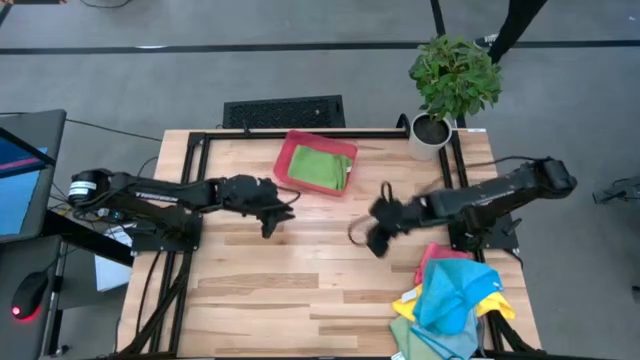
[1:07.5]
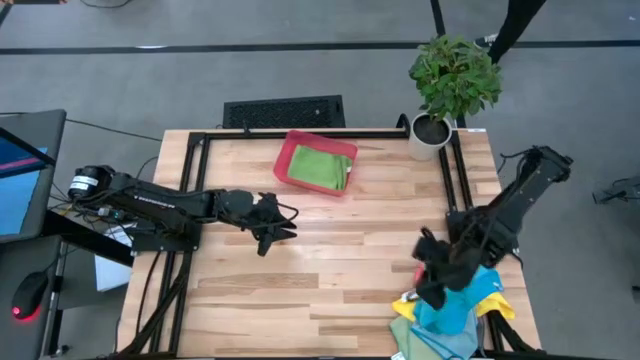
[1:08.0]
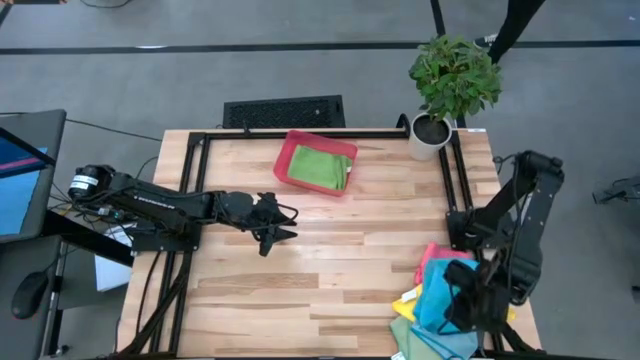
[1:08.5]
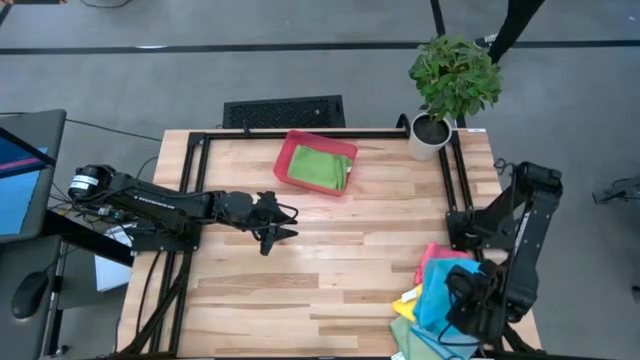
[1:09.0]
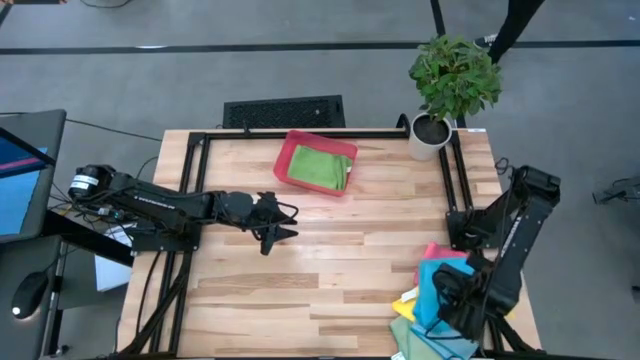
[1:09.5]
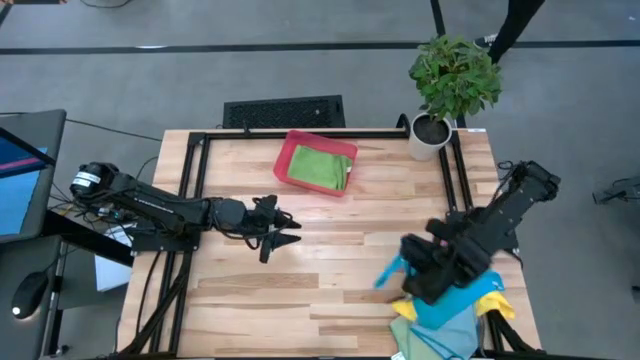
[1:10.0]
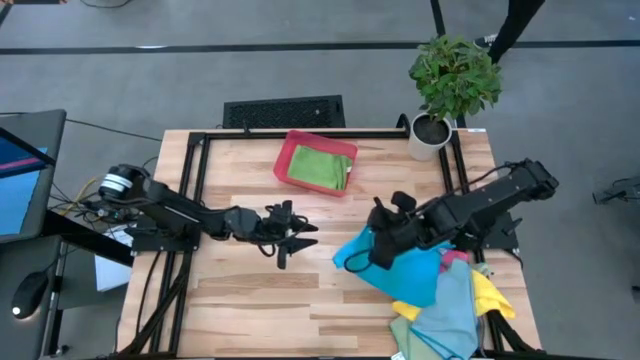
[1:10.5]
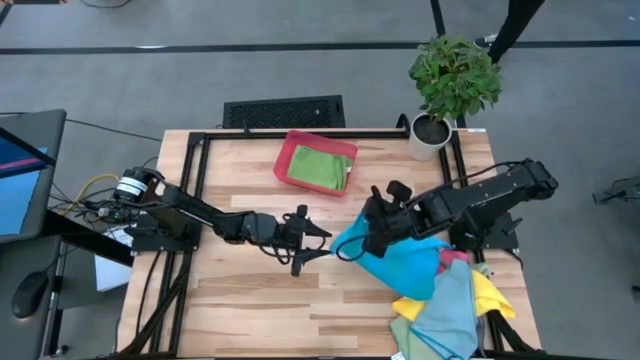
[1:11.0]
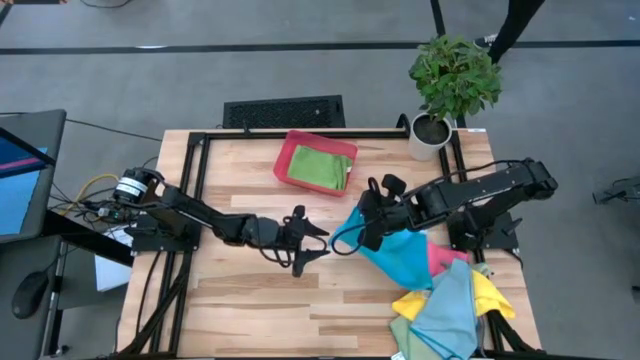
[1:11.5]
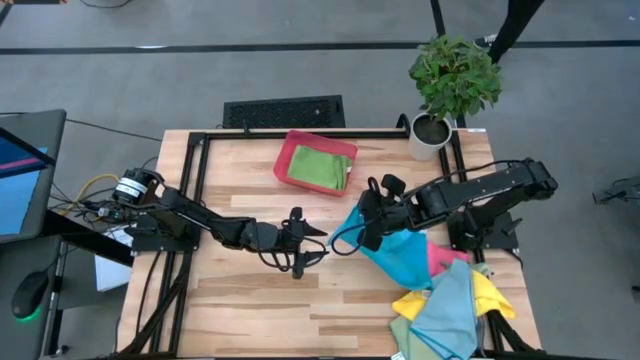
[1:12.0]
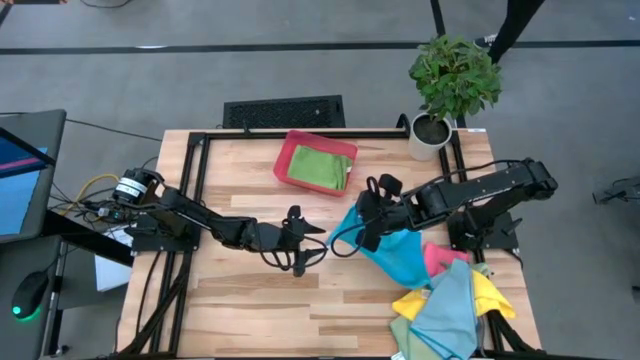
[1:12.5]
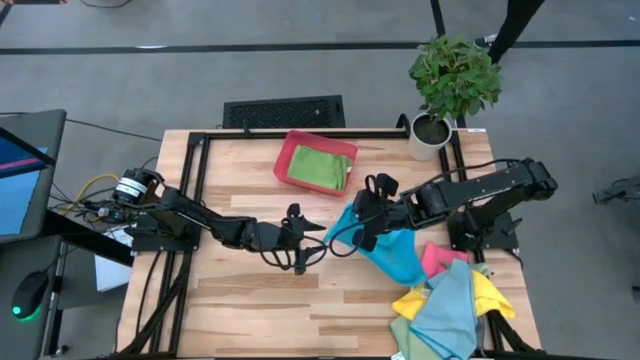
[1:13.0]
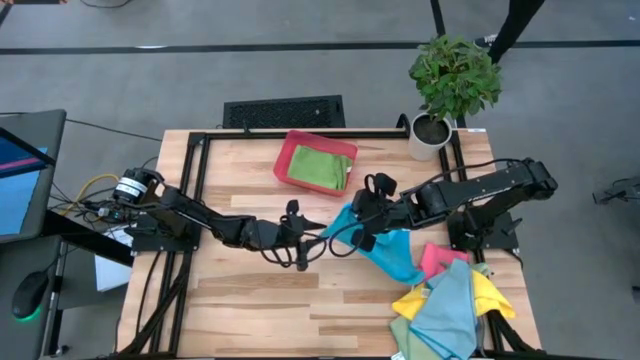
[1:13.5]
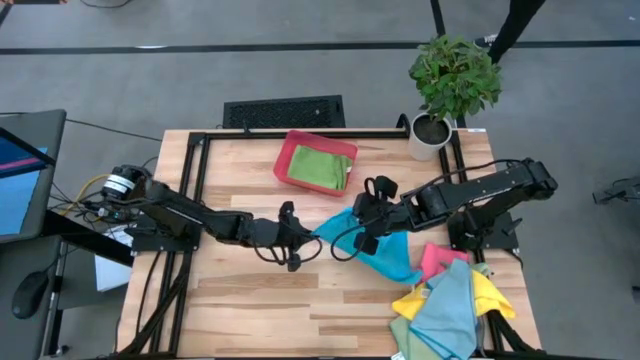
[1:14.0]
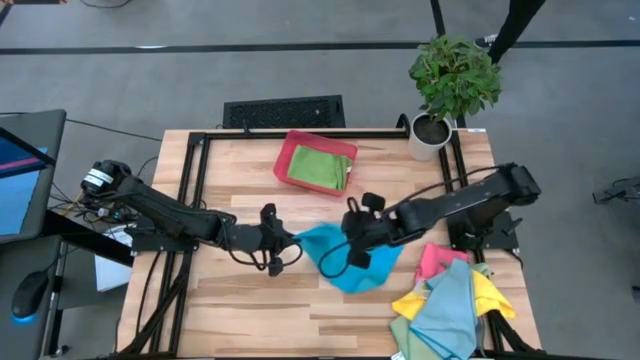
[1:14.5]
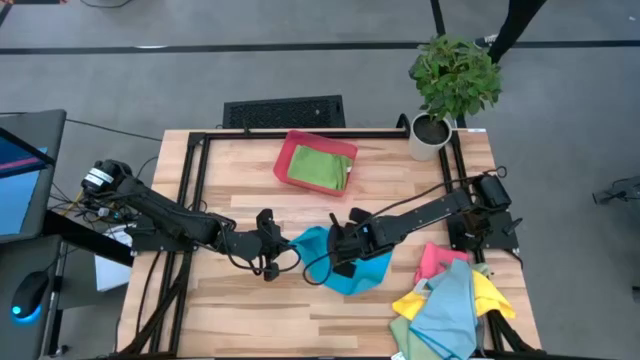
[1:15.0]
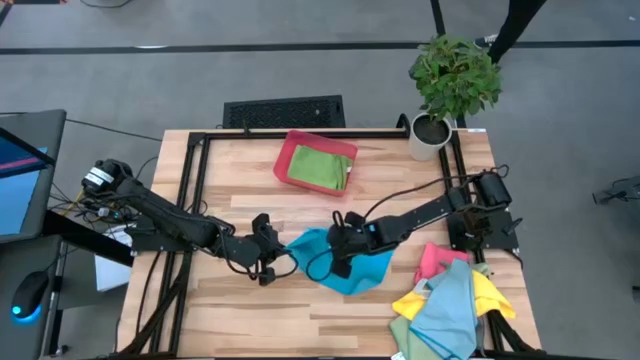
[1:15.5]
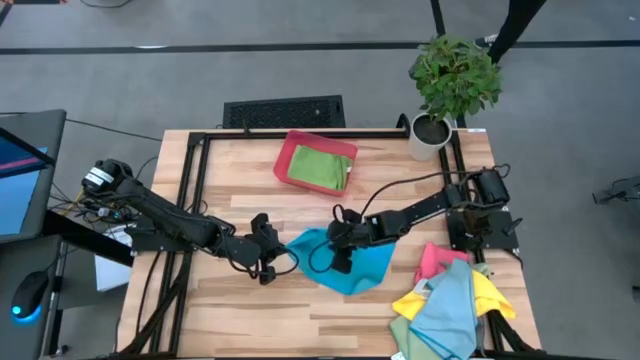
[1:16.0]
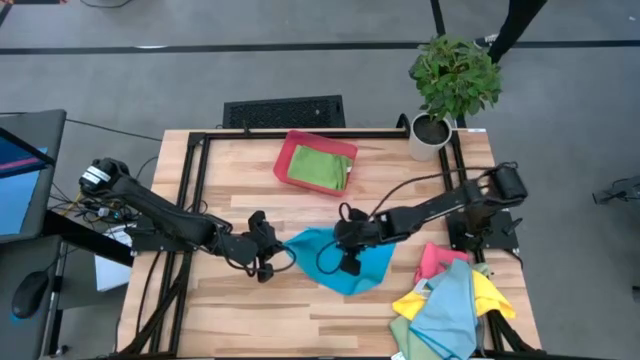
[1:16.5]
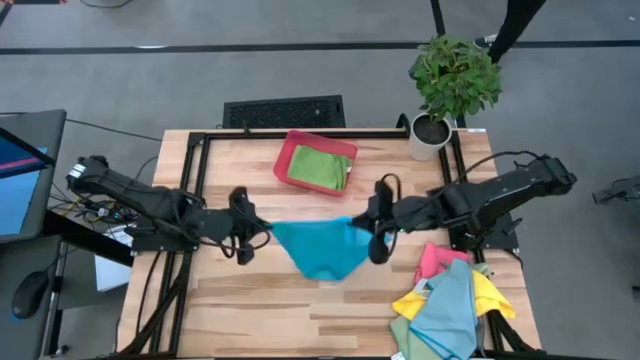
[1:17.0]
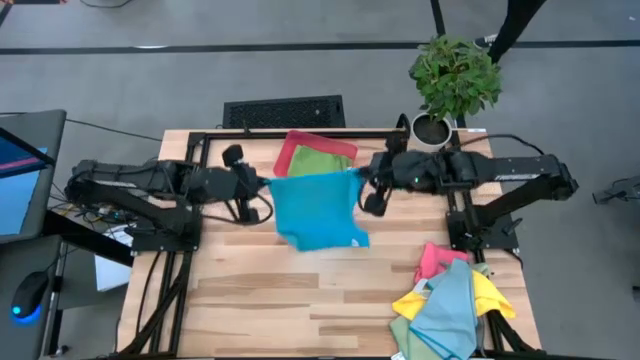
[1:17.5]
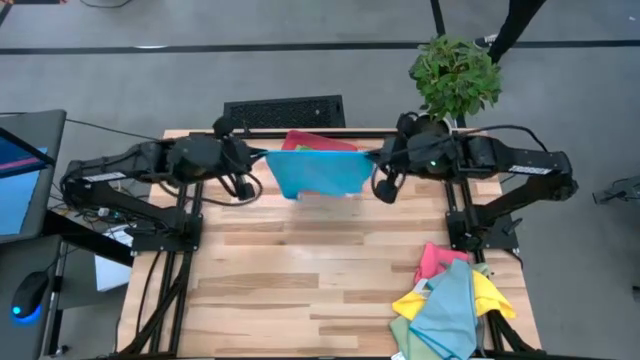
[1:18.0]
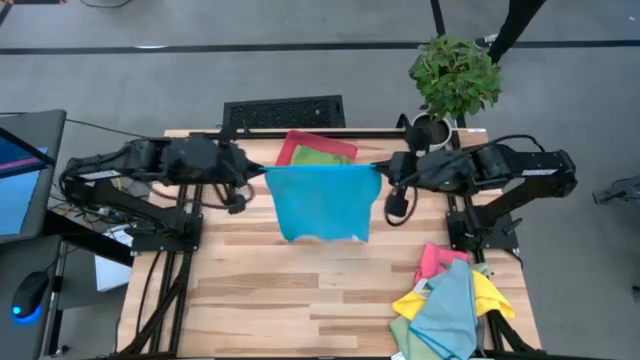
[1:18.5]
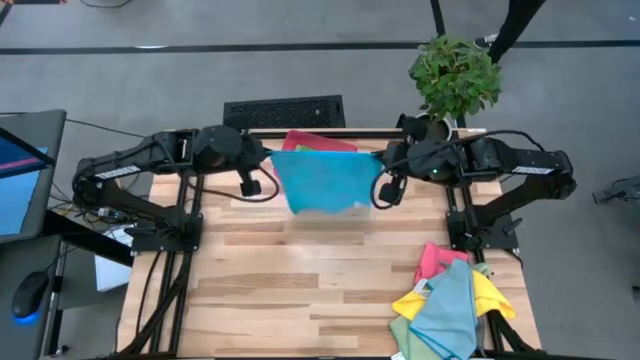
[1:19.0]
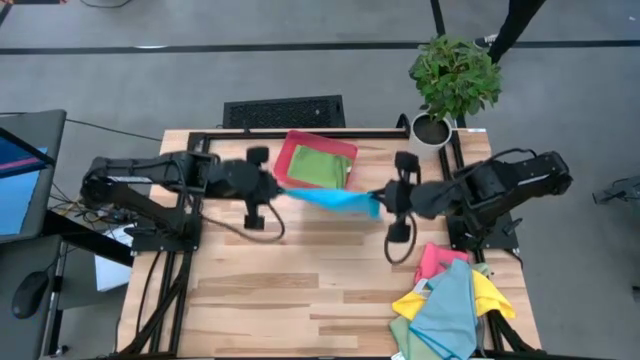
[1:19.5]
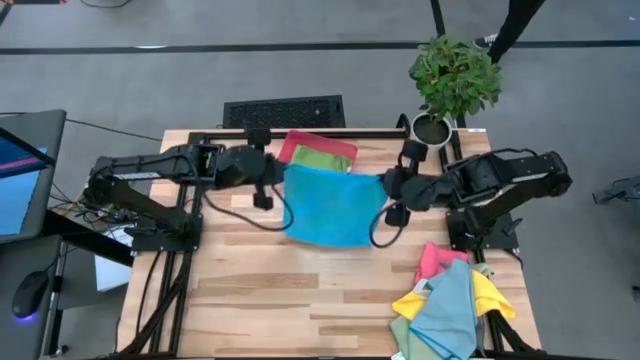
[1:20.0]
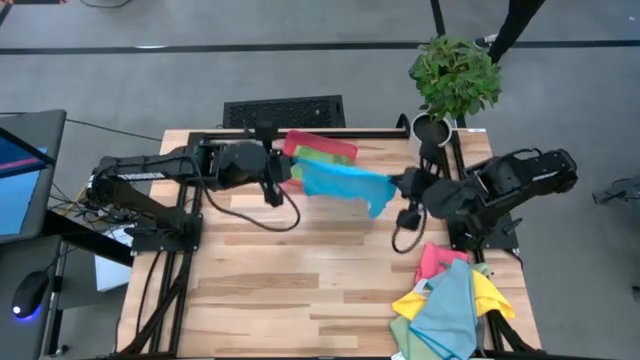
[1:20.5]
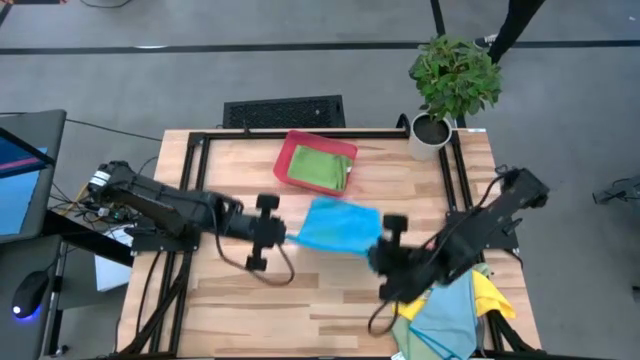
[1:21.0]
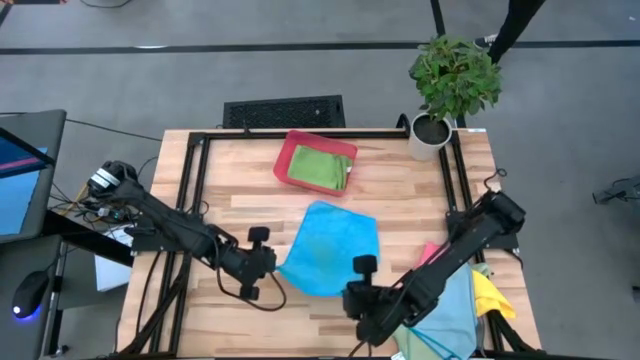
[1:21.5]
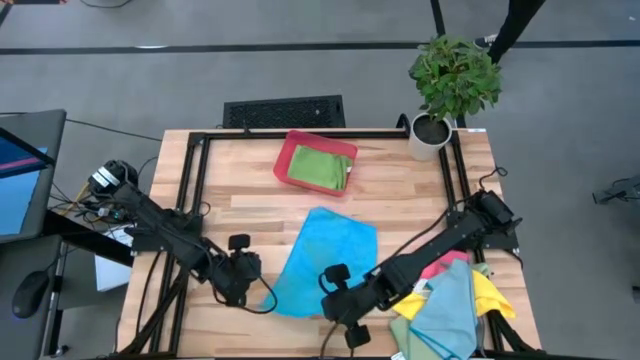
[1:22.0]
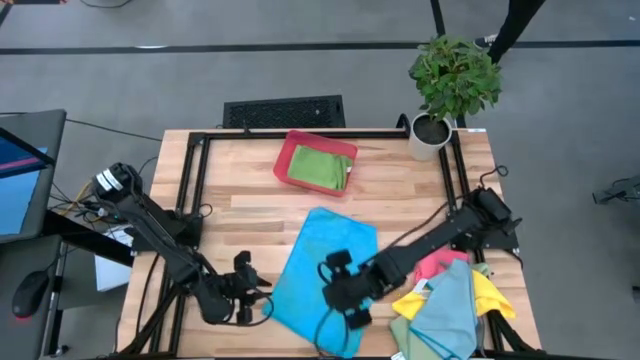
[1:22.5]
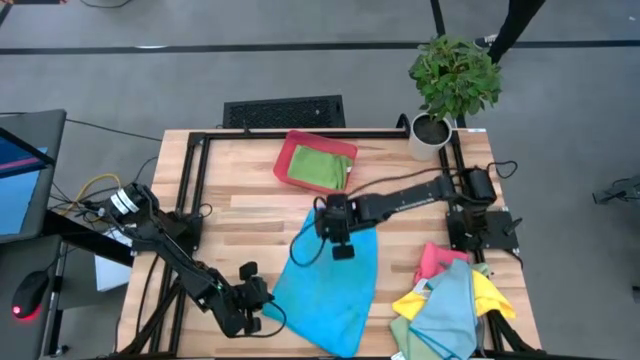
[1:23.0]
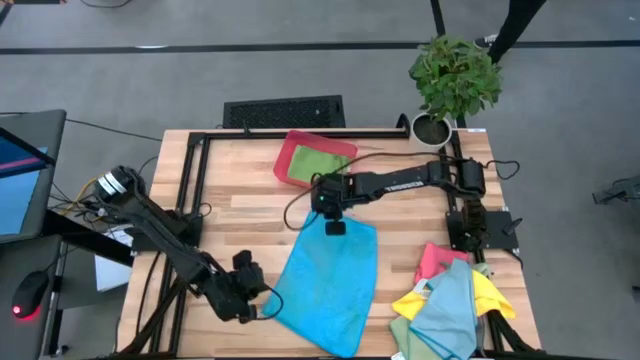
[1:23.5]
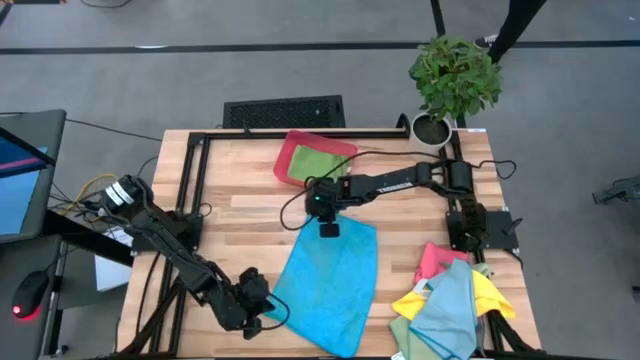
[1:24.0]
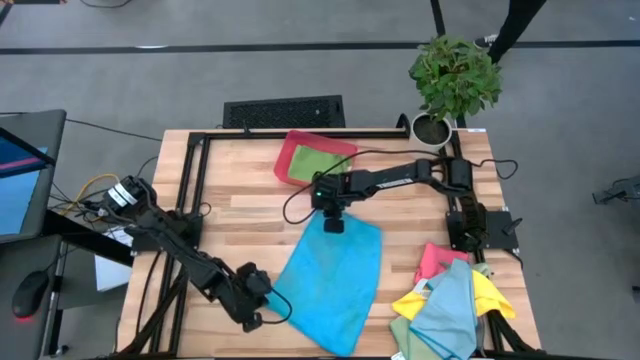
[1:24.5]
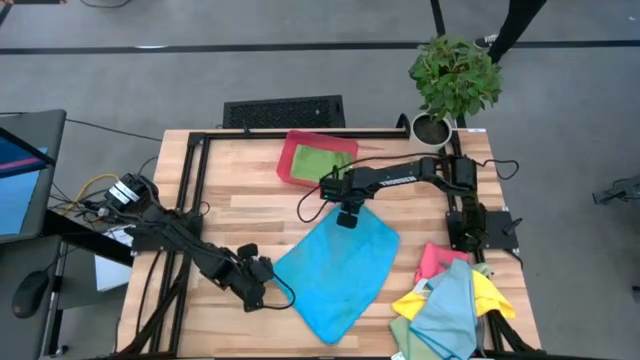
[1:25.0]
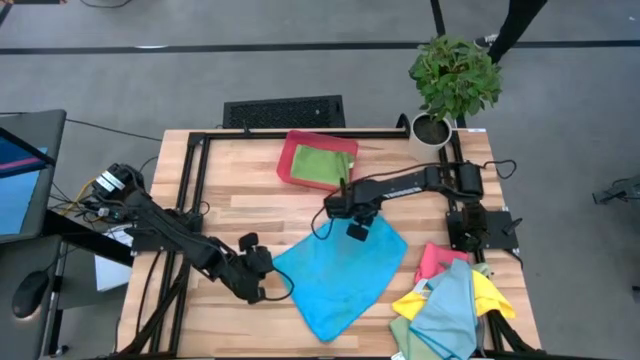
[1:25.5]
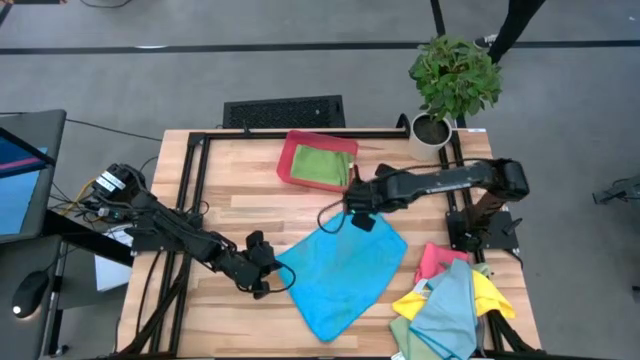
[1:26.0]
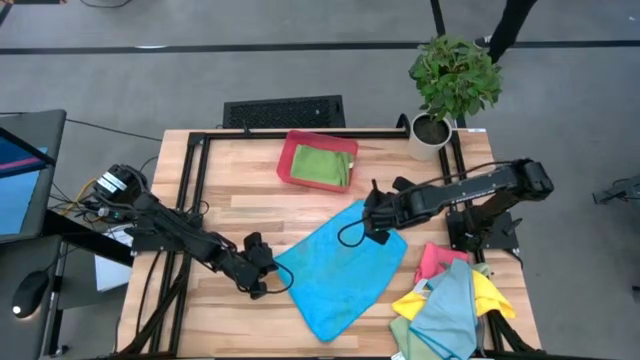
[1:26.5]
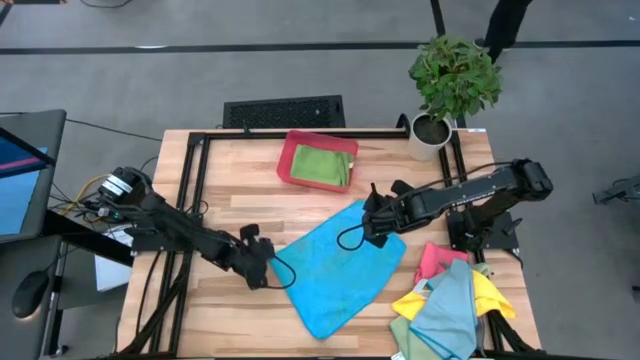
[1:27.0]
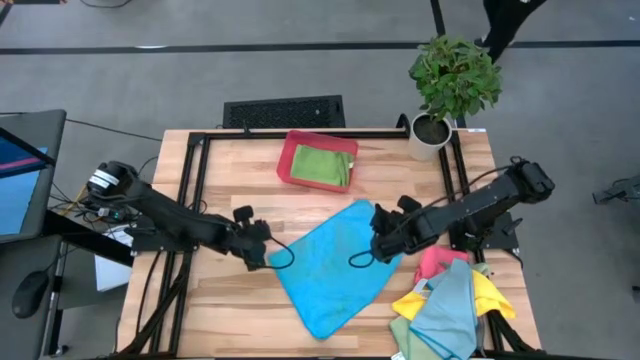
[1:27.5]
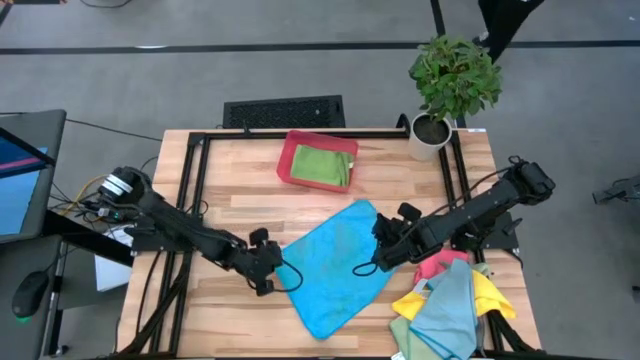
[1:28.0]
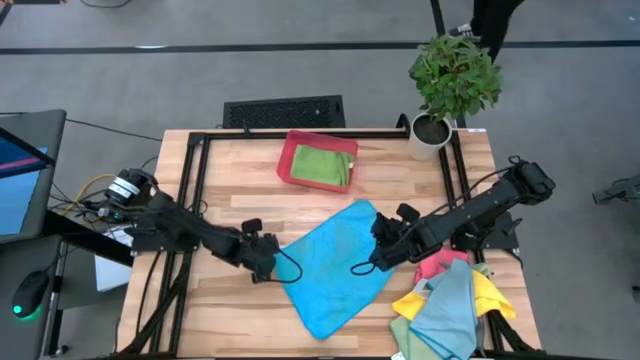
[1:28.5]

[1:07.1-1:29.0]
Task: Fold microfiber towels
Fold the blue microfiber cloth
